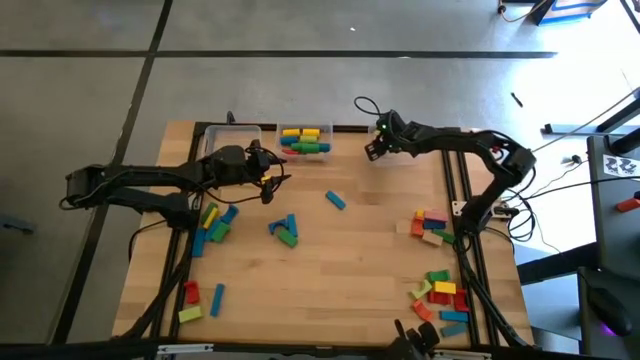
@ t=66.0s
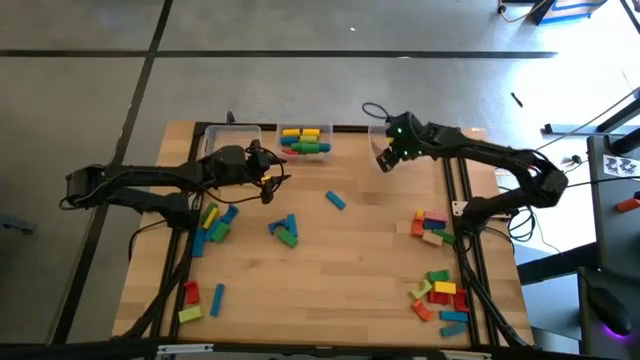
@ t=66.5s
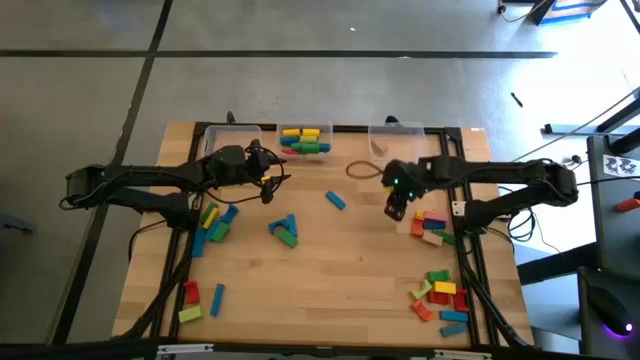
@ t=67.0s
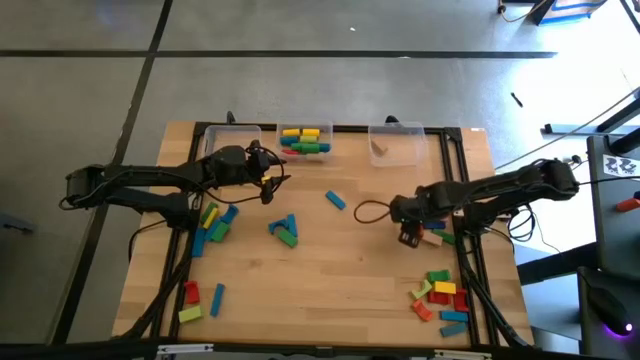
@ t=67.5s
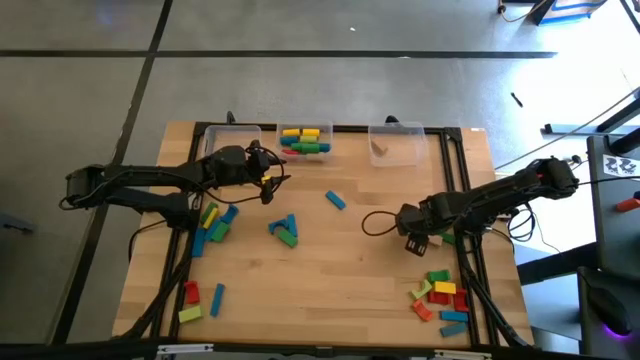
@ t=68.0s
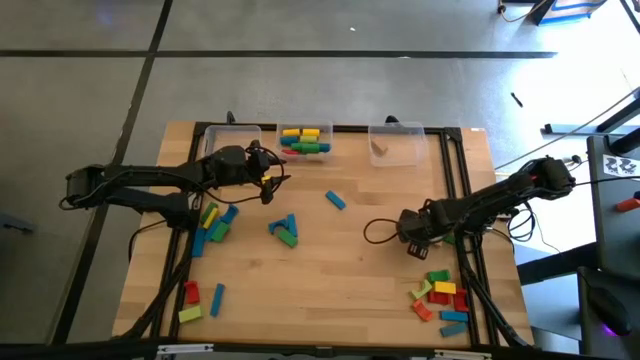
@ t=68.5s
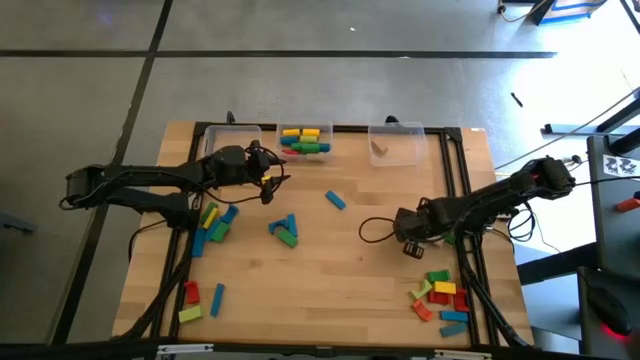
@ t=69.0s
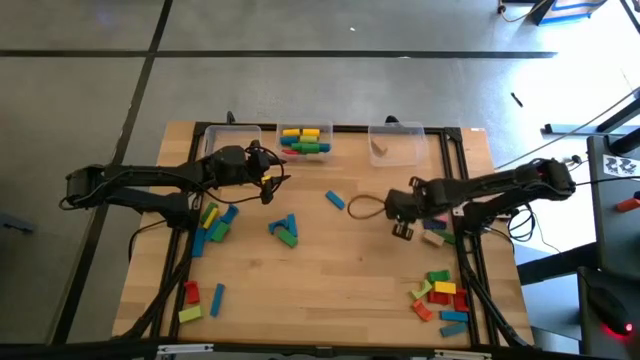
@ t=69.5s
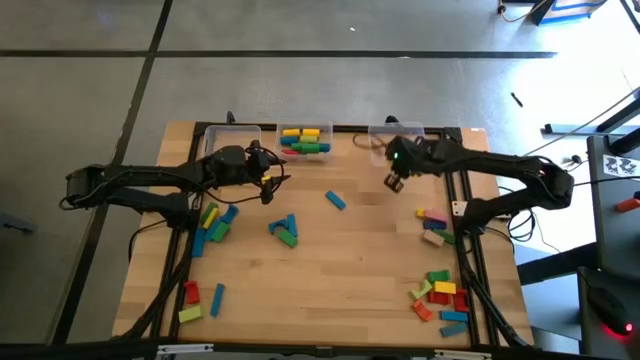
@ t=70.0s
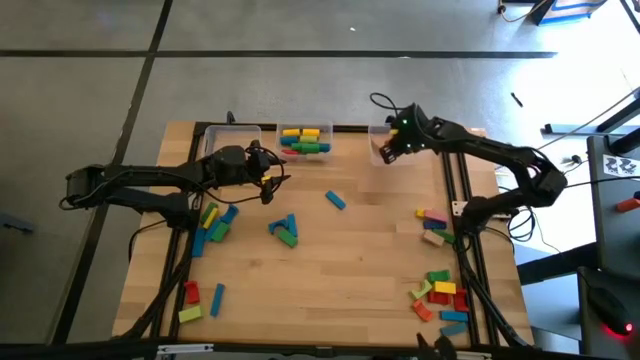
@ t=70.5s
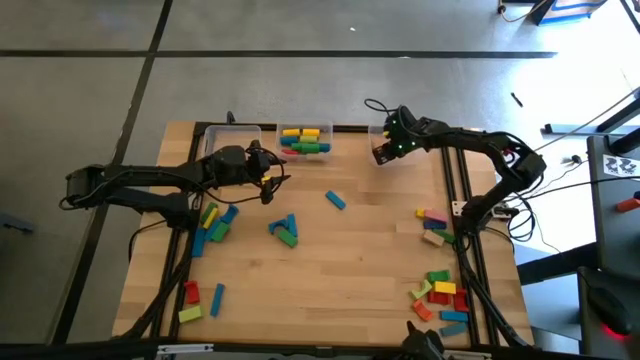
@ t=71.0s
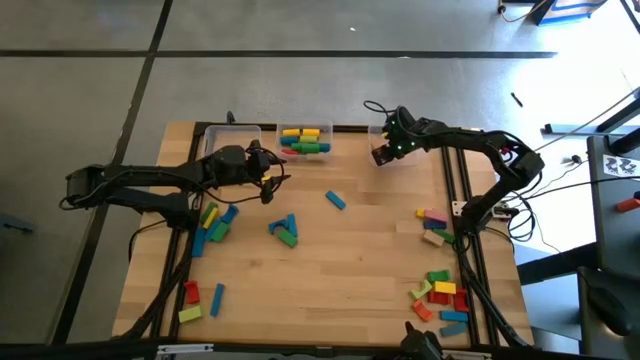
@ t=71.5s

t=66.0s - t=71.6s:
Task: Sort blocks by size
Put the orange arch block into the right transparent bin

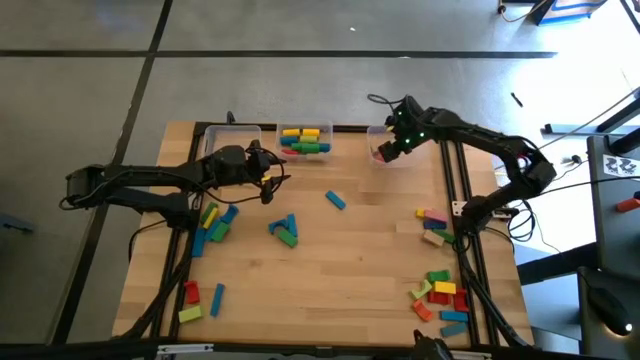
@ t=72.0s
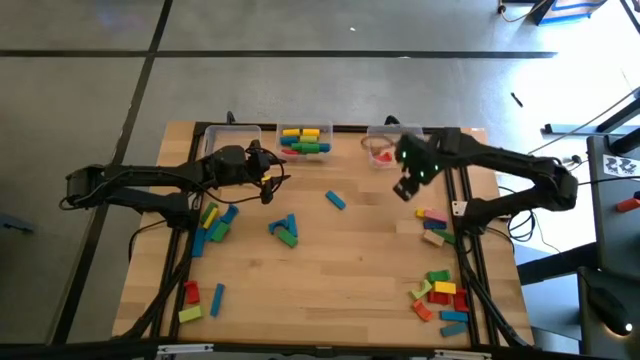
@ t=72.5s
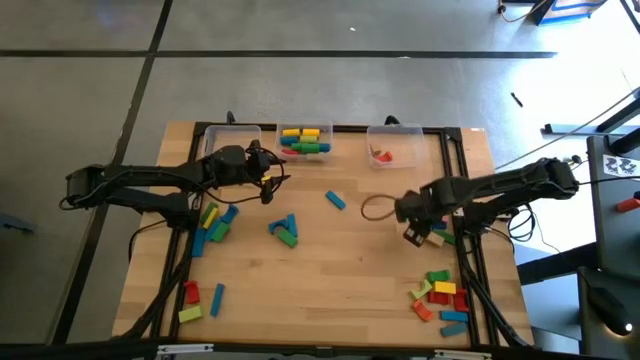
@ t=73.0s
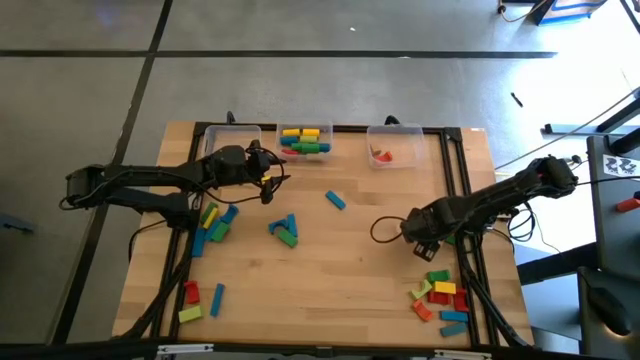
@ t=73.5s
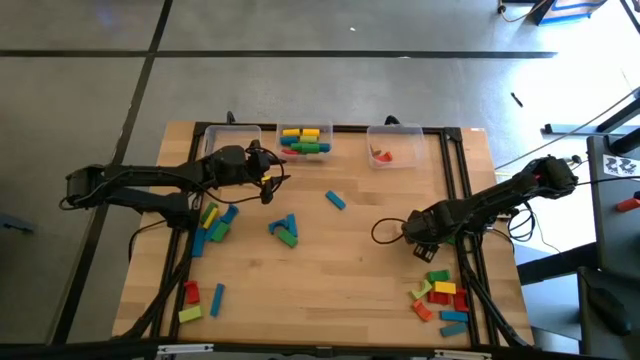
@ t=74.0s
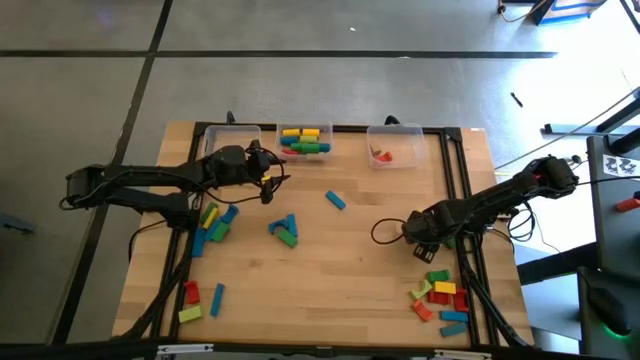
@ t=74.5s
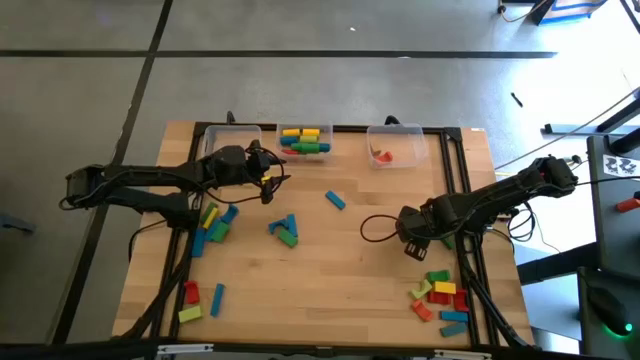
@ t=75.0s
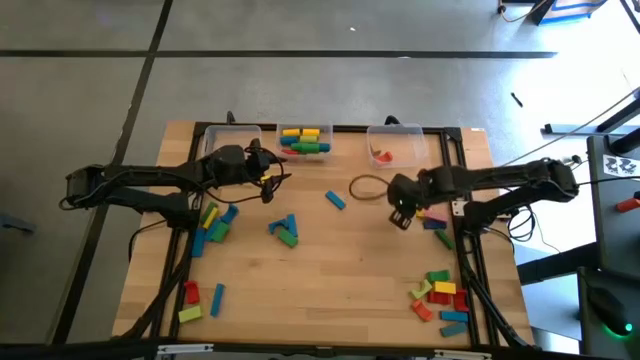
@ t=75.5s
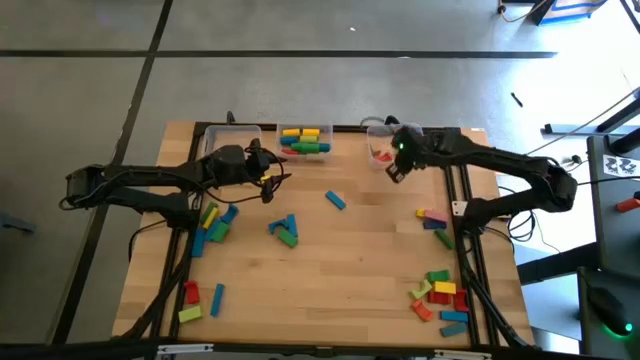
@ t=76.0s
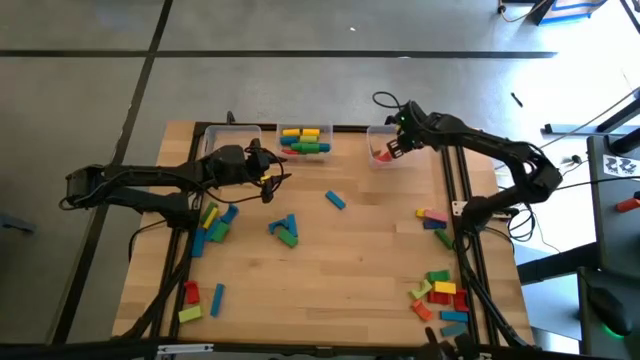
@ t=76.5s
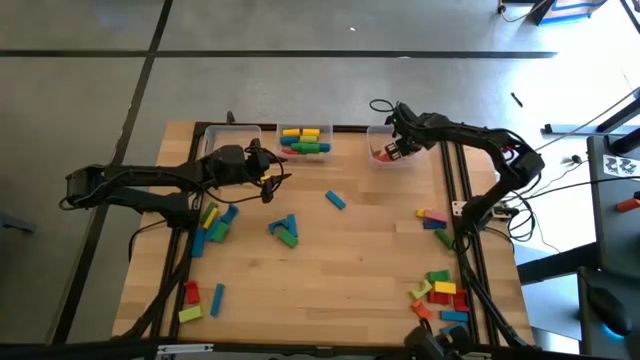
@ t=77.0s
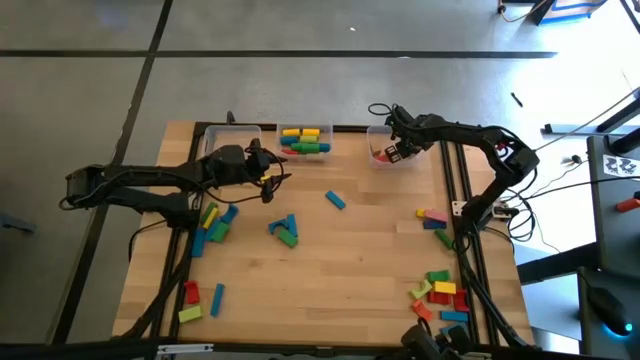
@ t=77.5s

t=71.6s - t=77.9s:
Put the brown rectangular block into the right transparent bin

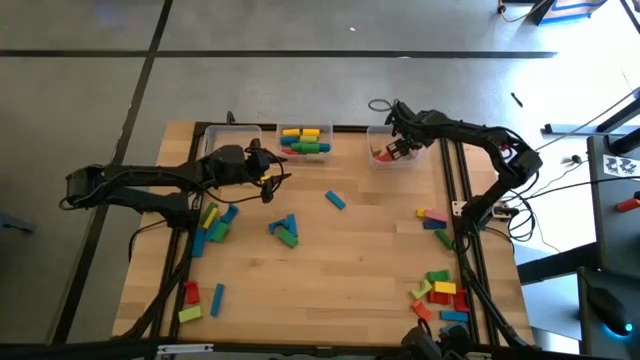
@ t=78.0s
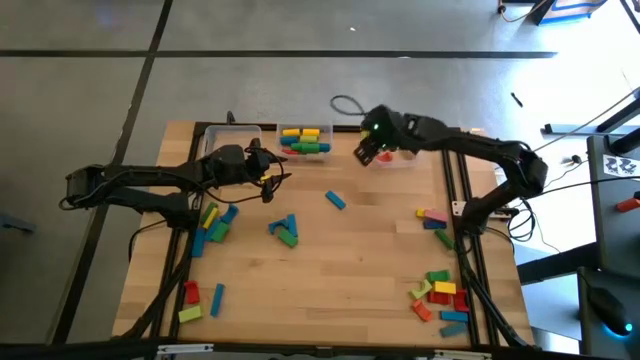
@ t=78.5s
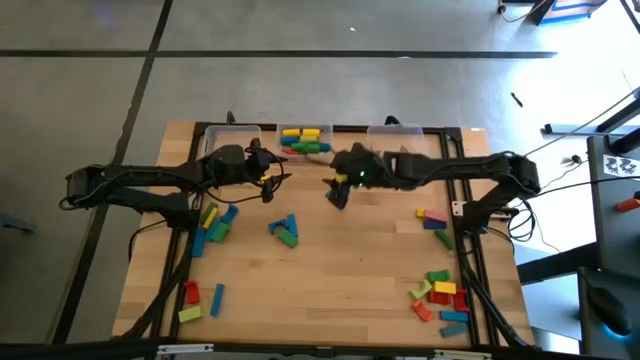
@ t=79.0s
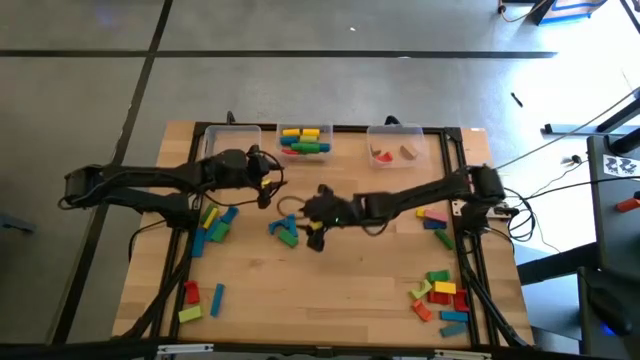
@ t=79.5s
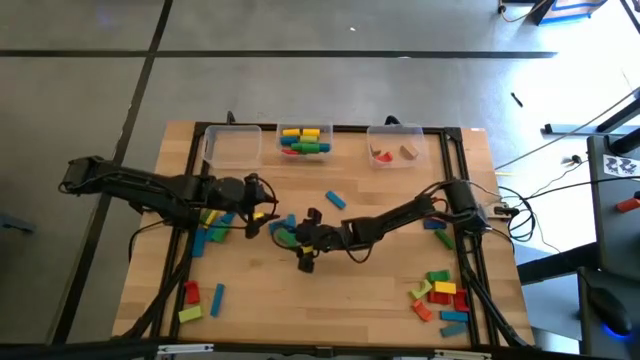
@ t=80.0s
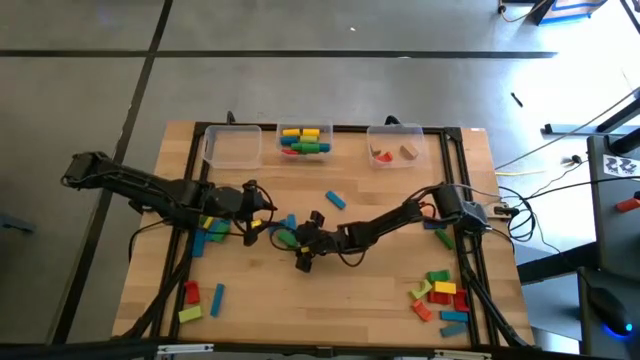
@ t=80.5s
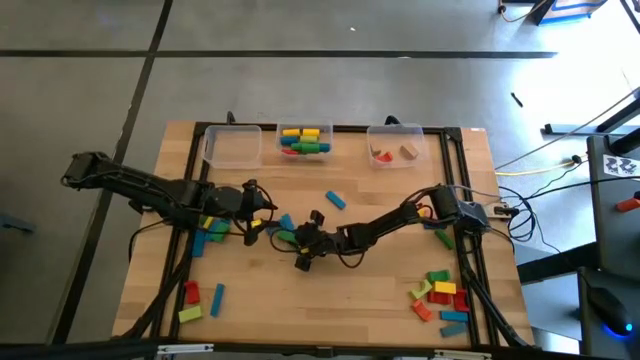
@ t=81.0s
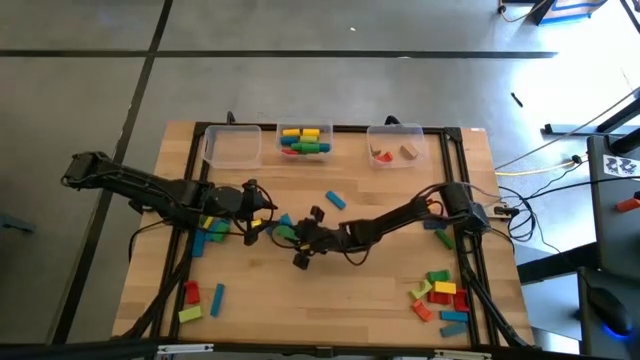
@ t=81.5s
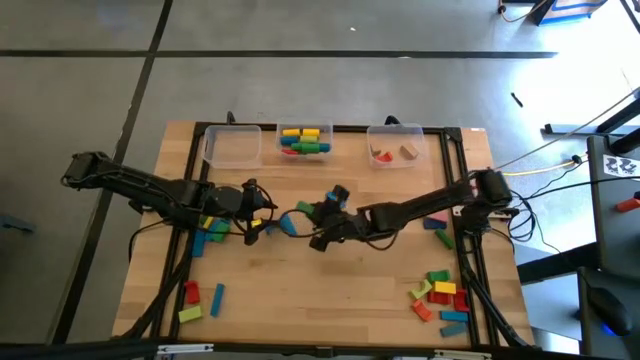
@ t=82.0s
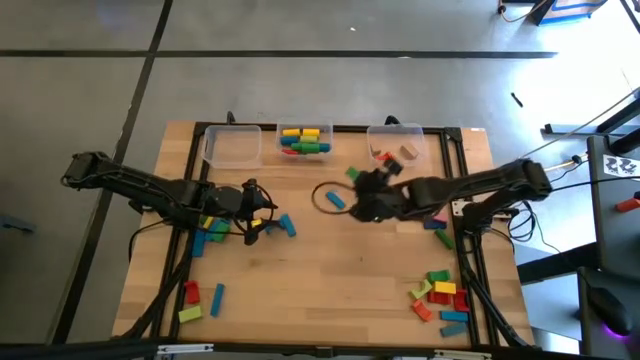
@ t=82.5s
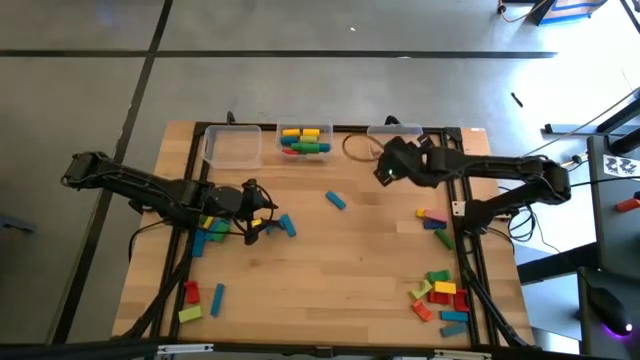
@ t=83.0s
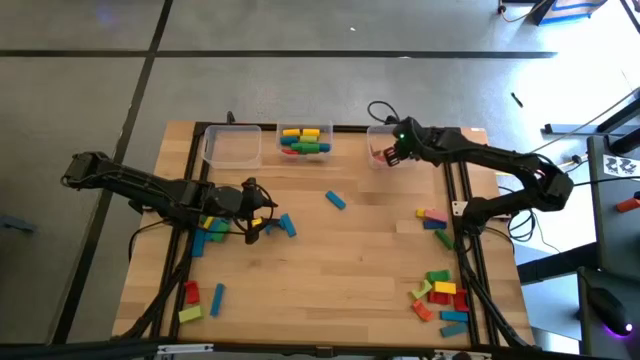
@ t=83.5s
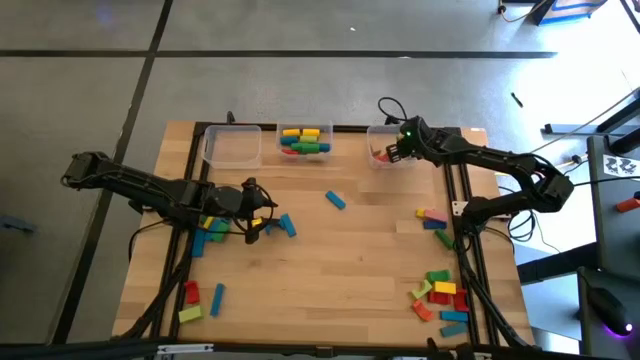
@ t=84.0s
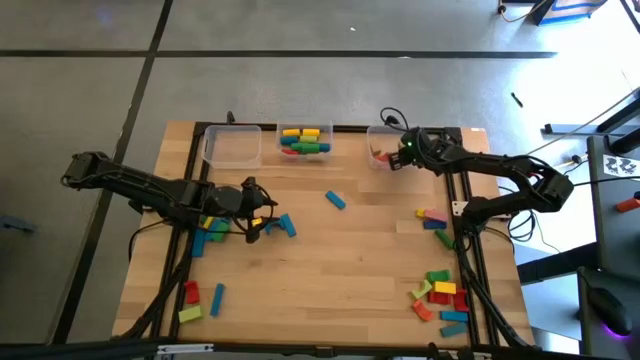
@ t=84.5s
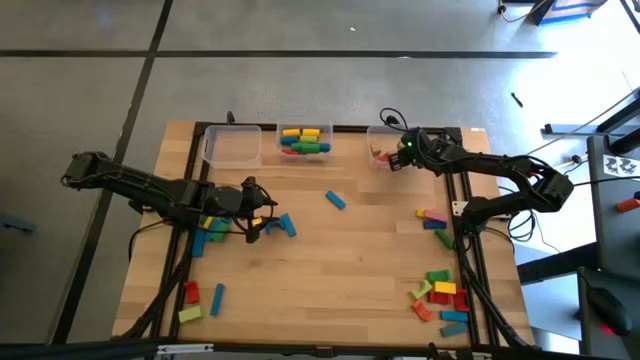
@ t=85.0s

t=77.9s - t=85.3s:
Put the green rectangular block into the right transparent bin
